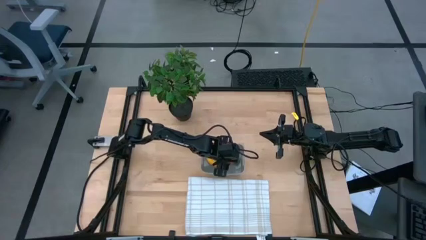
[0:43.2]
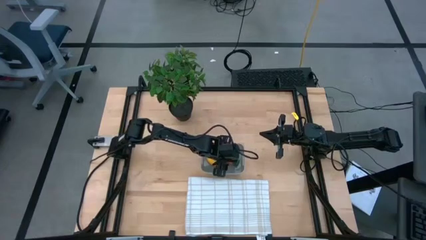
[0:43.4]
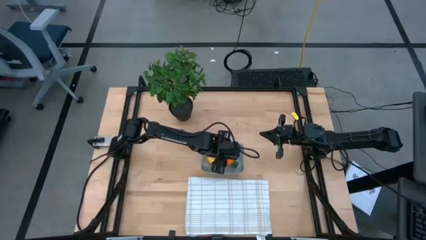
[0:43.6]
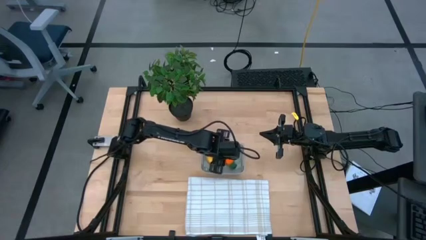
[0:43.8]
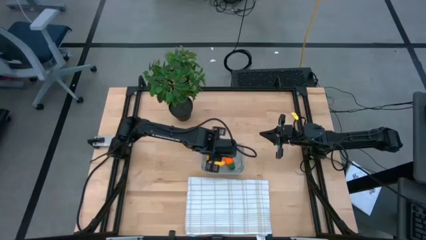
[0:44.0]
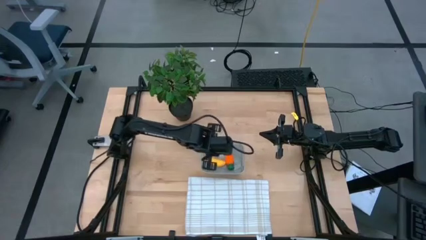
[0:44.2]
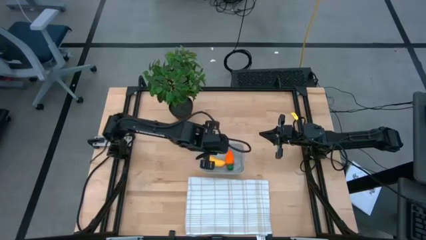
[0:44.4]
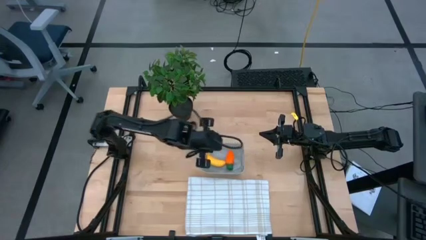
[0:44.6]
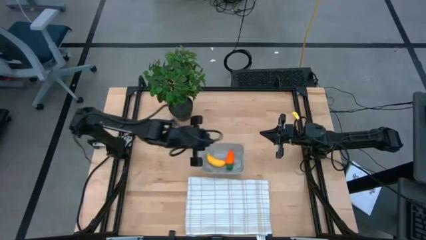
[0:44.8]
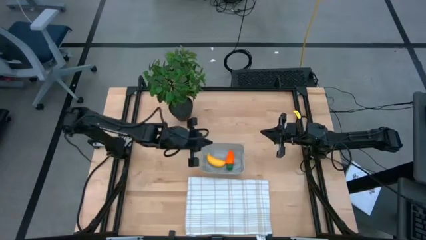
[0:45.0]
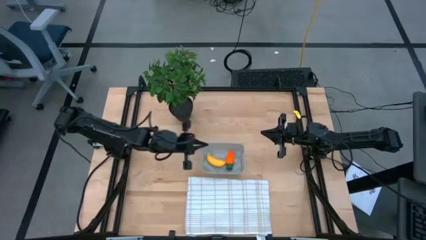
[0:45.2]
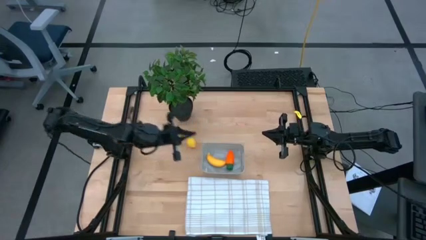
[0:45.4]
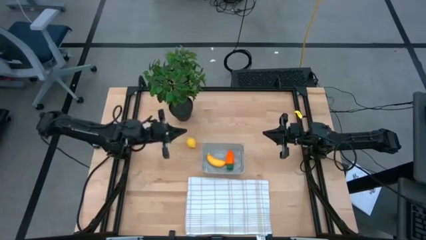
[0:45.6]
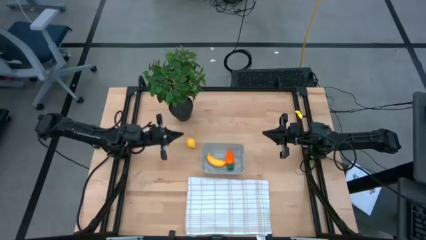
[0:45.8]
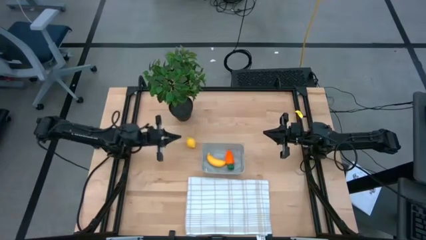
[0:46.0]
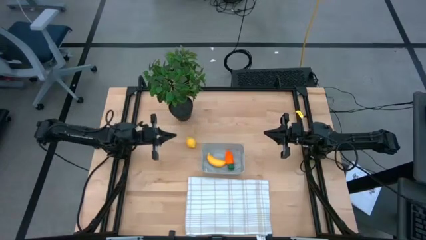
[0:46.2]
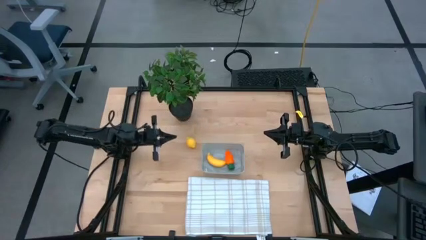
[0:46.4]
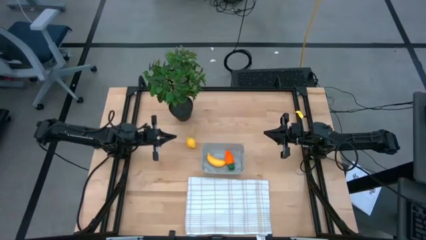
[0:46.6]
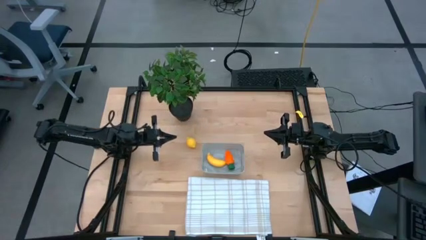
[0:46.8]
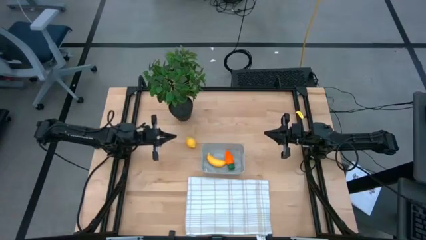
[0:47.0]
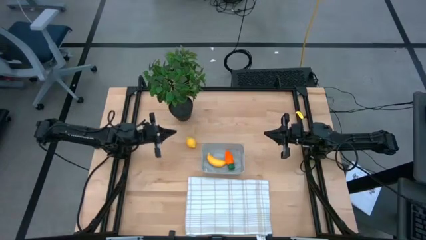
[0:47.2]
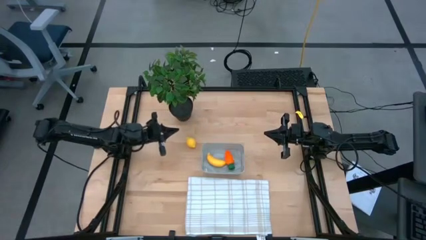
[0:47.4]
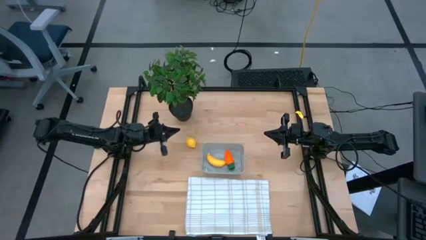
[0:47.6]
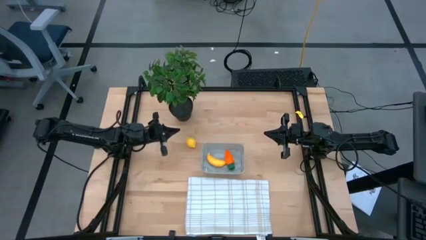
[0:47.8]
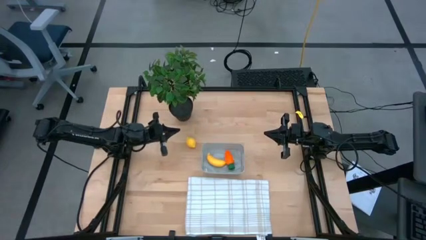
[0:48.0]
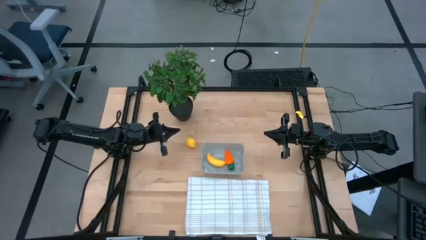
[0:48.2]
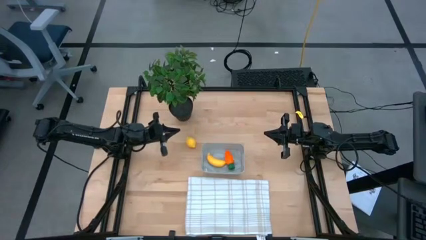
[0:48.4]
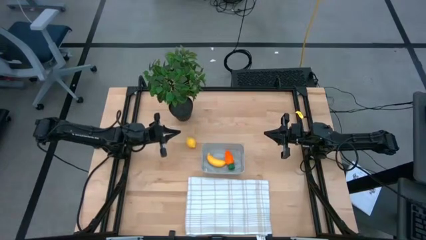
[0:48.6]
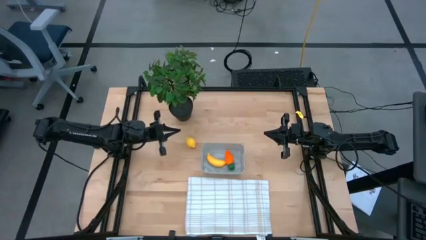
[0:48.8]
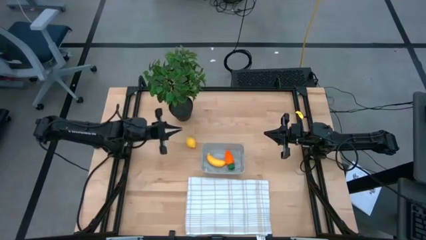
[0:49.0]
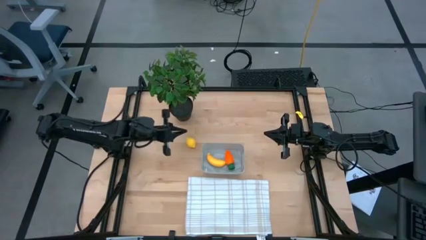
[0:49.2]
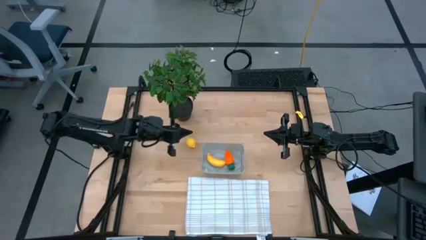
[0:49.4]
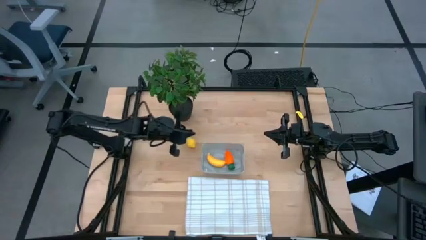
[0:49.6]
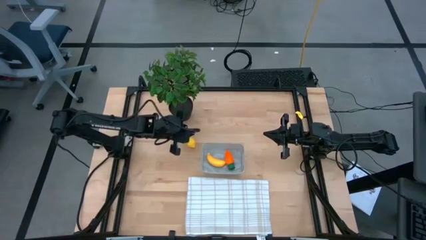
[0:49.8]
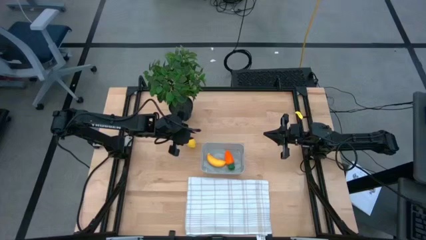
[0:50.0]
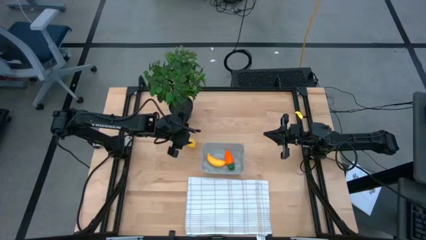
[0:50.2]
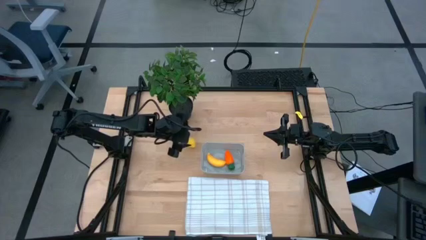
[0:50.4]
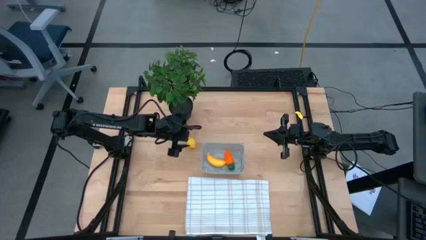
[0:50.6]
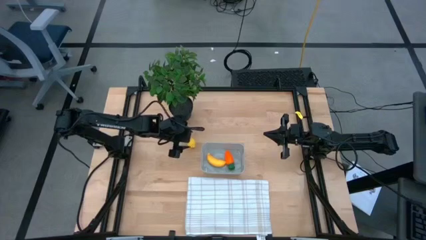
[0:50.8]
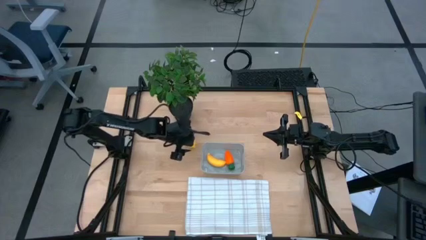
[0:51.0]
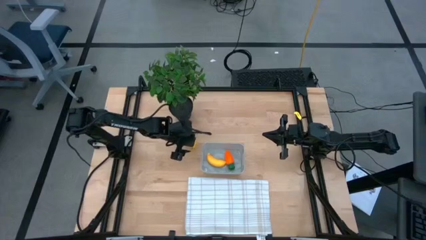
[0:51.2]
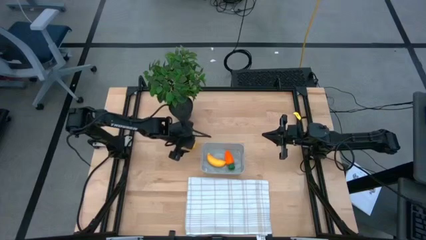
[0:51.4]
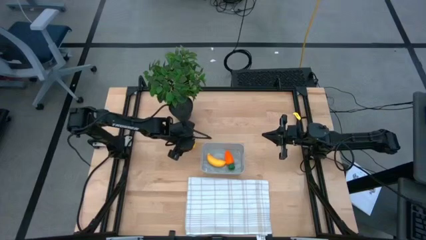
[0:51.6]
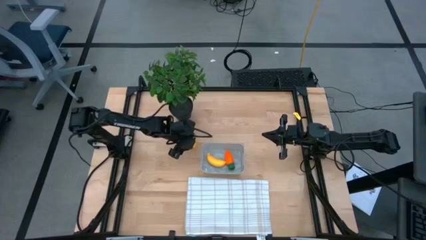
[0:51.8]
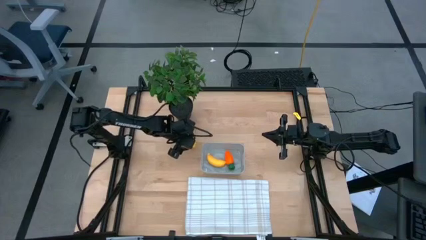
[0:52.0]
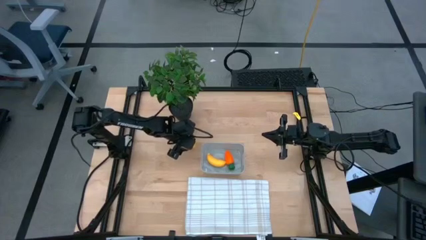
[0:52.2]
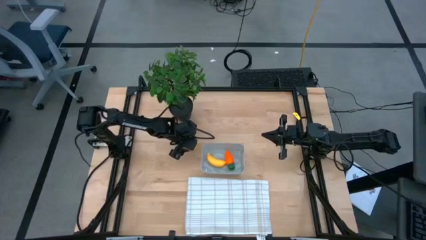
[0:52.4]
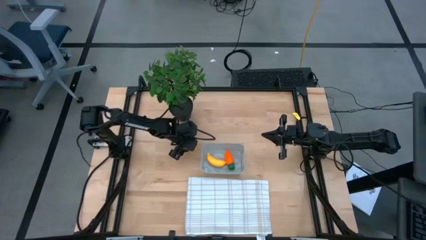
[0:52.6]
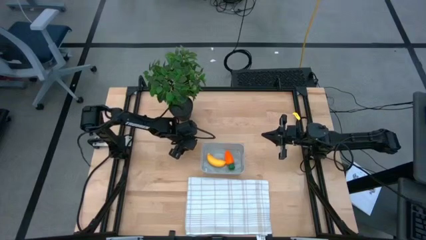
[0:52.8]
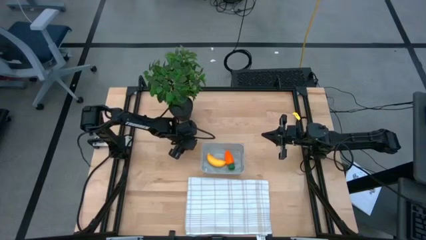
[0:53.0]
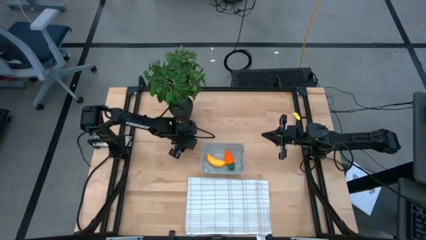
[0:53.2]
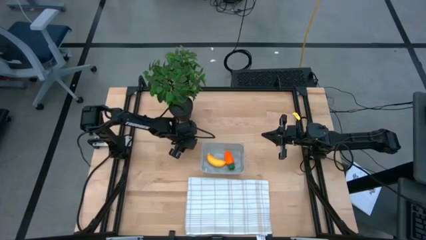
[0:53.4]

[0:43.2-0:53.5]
Task: Pick and placing Produce into tupperware
Put the yellow lemon into the gray basket

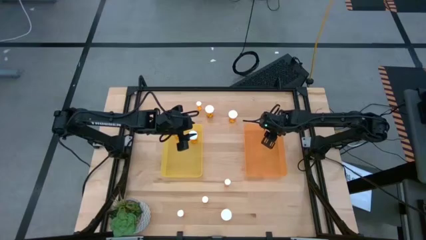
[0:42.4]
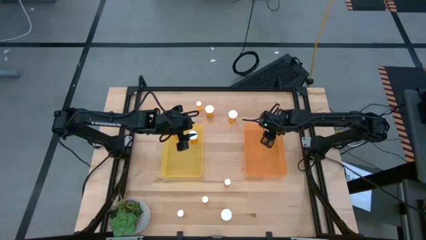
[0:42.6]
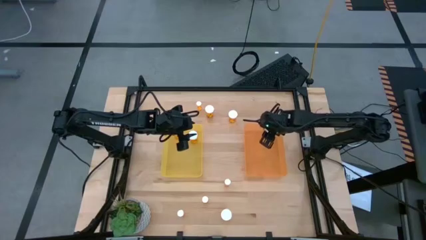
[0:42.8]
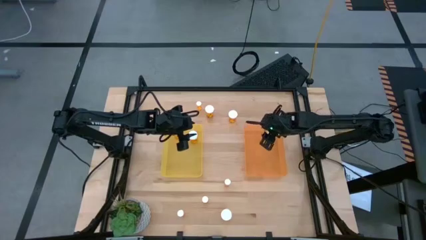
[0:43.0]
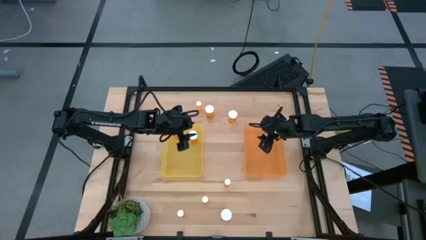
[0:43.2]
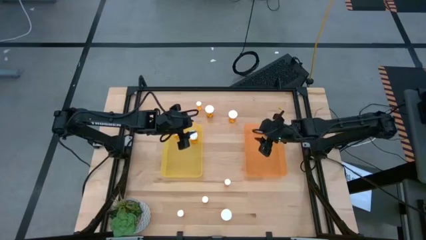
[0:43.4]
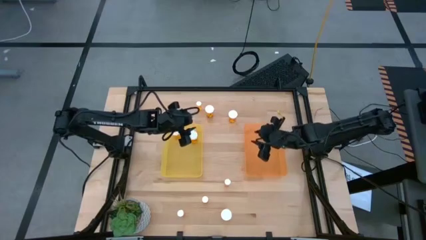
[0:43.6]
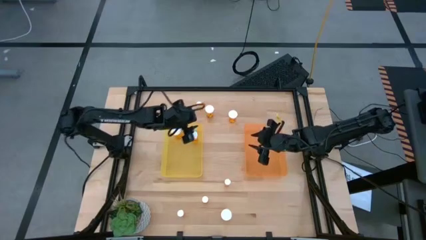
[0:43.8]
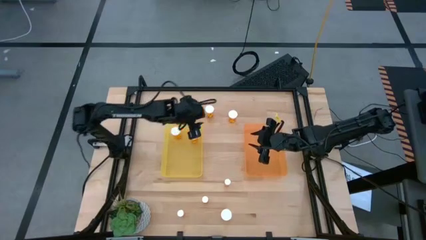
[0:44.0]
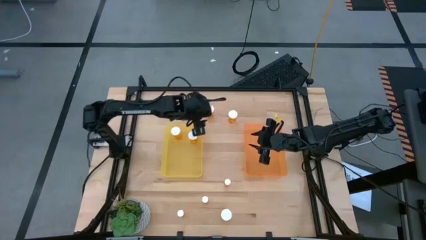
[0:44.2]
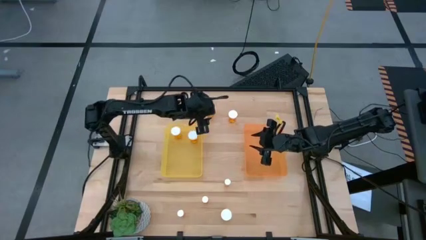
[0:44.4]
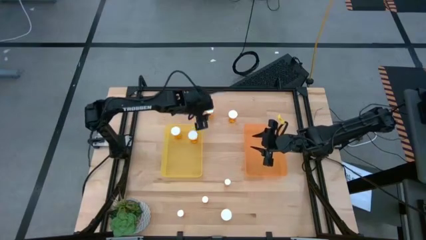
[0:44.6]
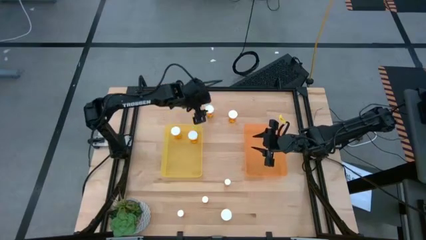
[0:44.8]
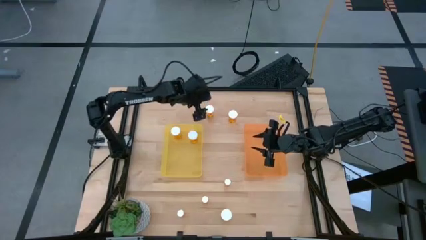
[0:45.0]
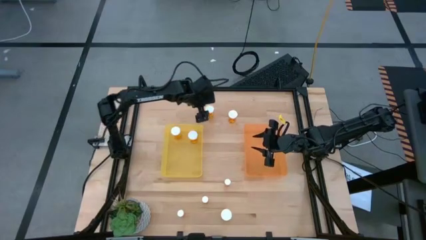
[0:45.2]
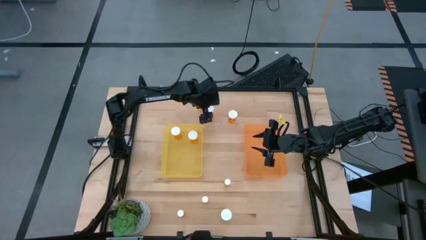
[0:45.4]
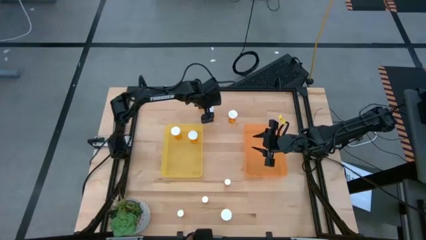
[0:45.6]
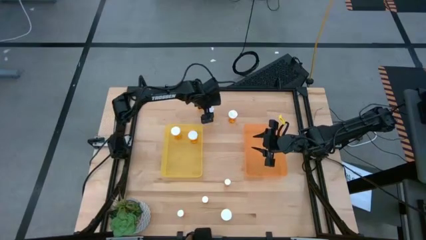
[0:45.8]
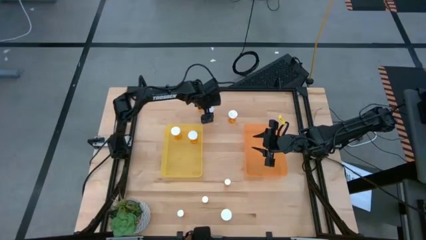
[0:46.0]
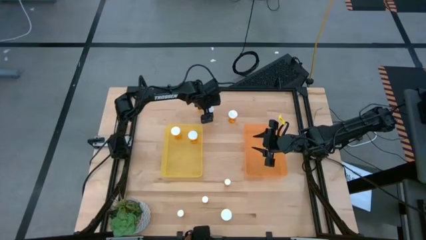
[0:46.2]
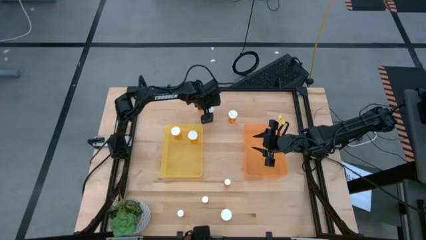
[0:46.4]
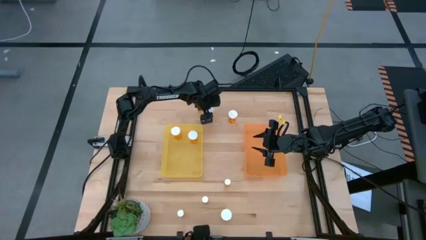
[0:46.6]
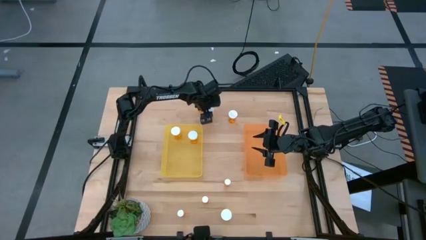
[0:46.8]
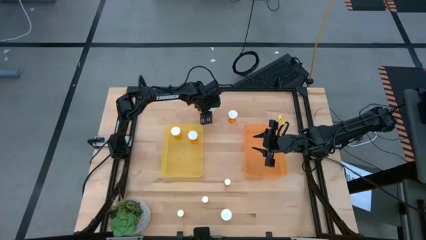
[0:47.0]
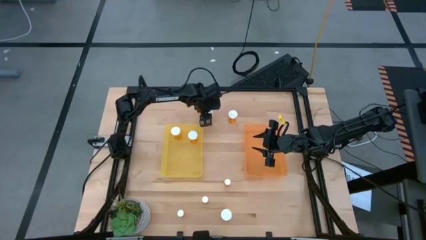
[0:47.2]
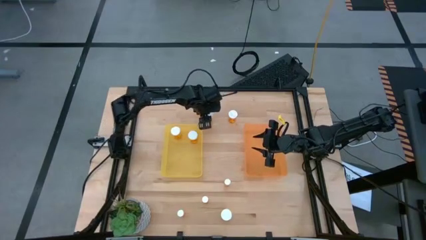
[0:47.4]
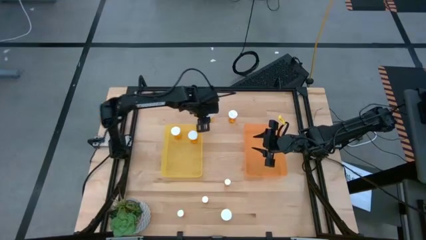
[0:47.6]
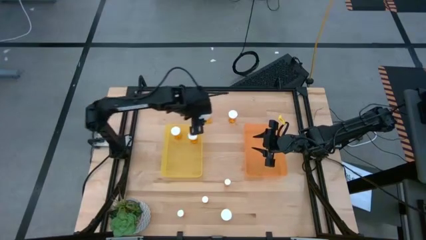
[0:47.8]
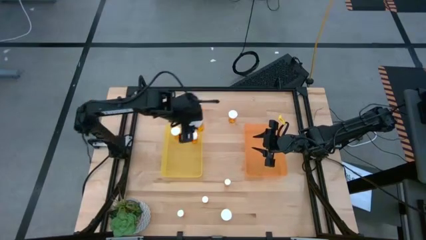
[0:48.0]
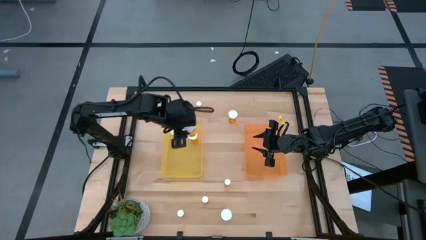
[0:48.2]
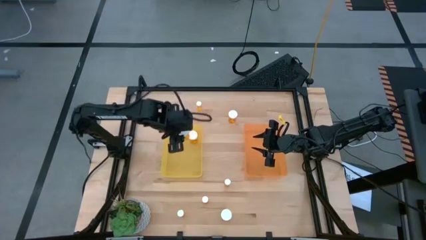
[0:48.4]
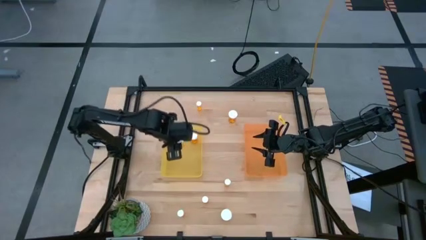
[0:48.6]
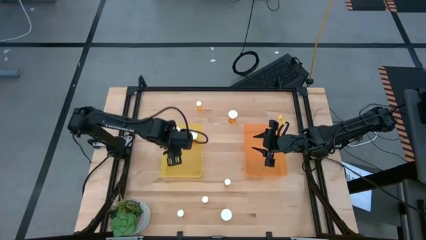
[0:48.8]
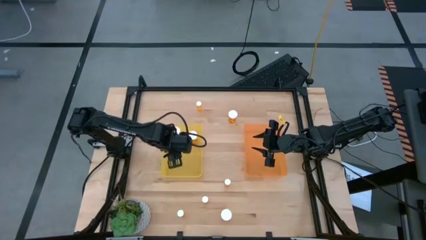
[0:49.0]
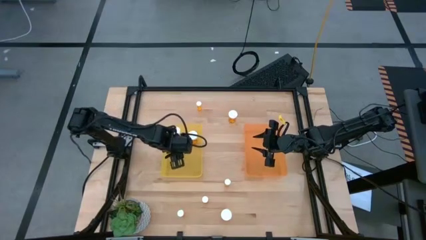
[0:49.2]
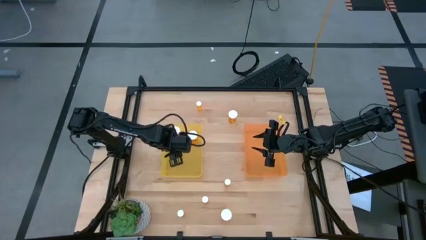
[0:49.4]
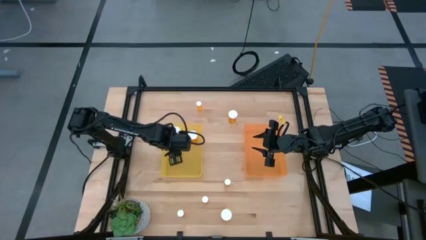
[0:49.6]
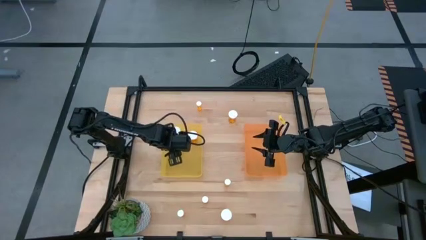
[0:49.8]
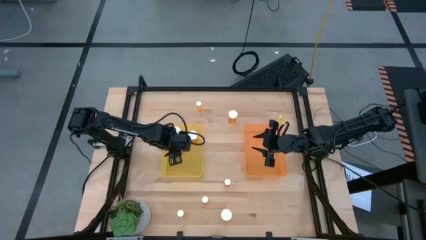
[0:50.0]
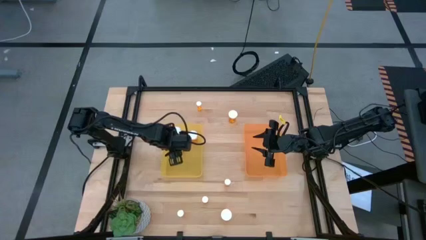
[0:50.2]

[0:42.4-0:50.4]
Task: Pick and place medicine bottles into bin by pill shape (circle, oval)
Put the large orange pill bottle into the yellow bin
